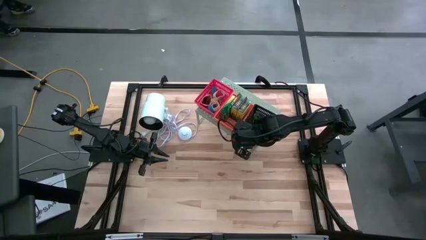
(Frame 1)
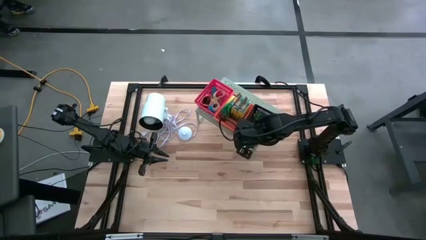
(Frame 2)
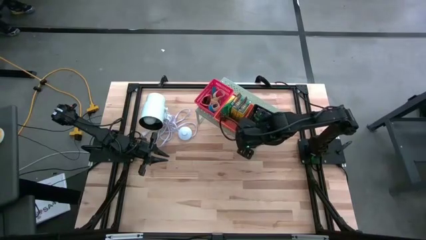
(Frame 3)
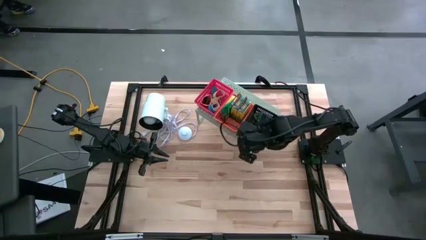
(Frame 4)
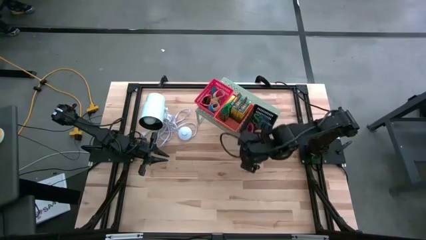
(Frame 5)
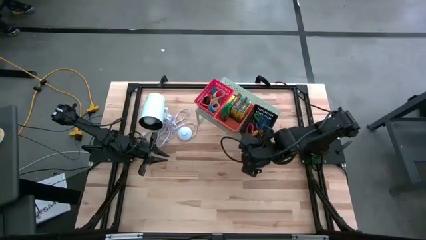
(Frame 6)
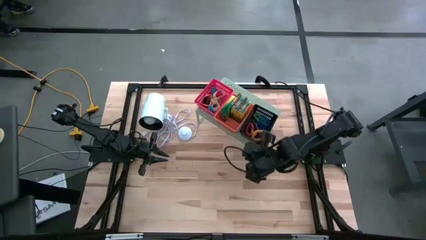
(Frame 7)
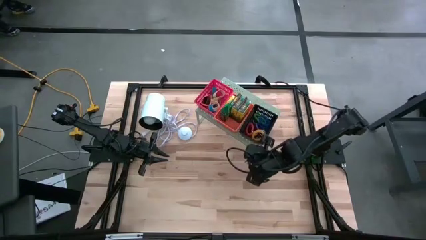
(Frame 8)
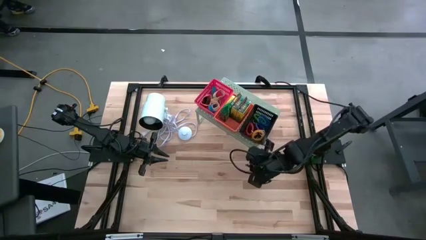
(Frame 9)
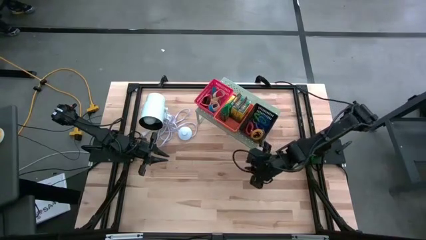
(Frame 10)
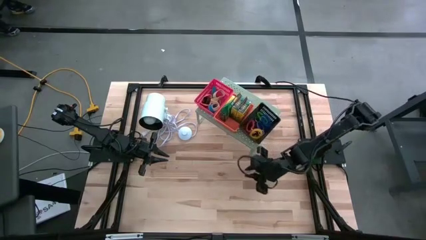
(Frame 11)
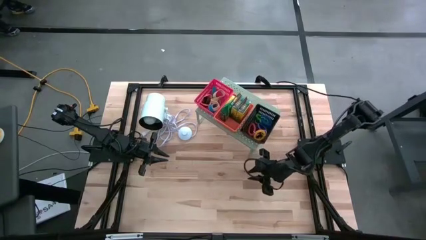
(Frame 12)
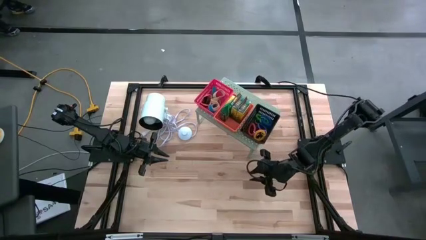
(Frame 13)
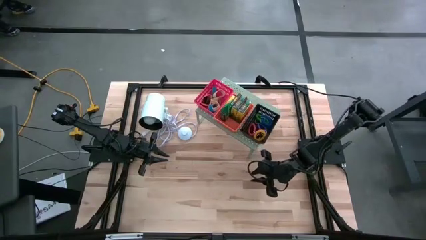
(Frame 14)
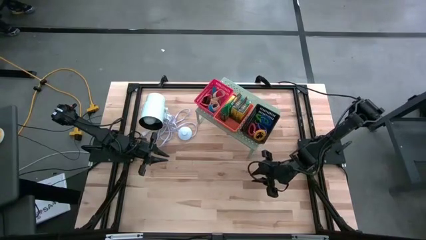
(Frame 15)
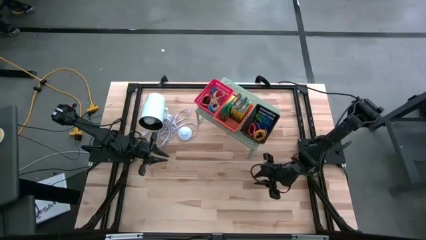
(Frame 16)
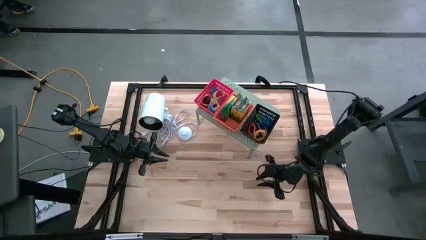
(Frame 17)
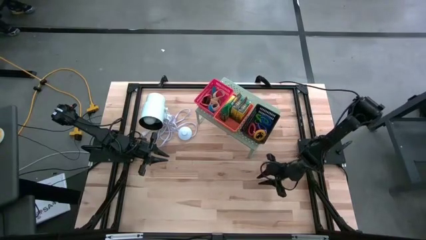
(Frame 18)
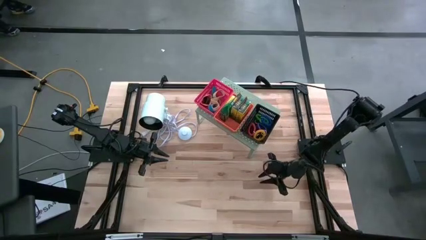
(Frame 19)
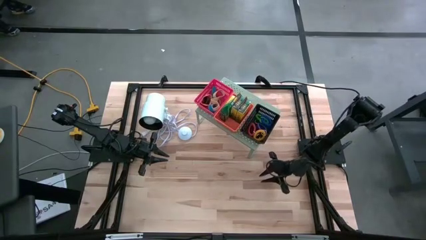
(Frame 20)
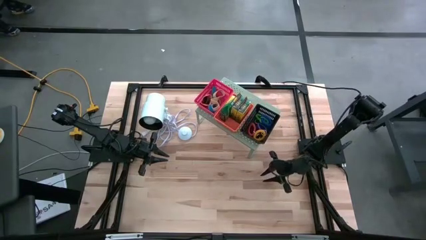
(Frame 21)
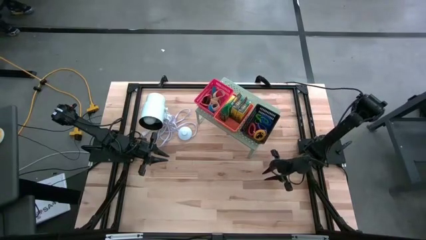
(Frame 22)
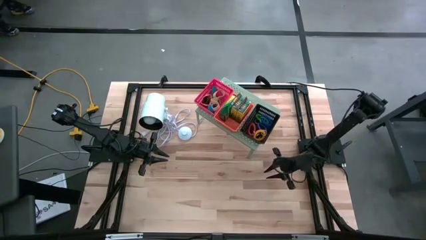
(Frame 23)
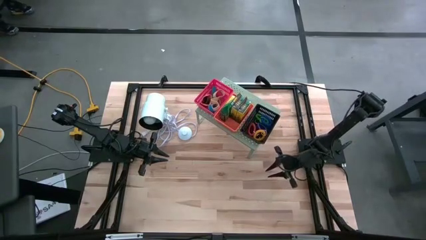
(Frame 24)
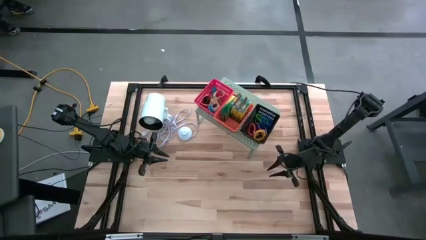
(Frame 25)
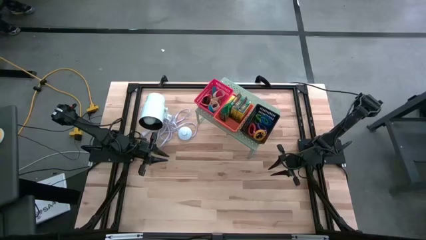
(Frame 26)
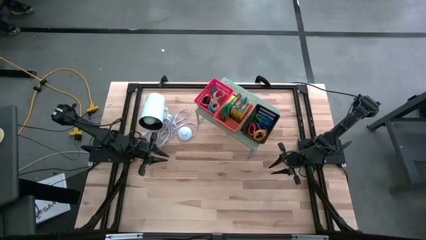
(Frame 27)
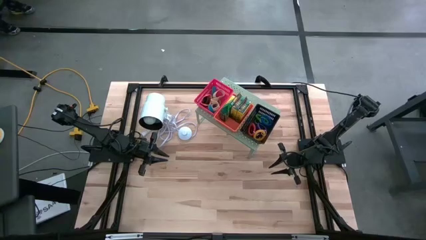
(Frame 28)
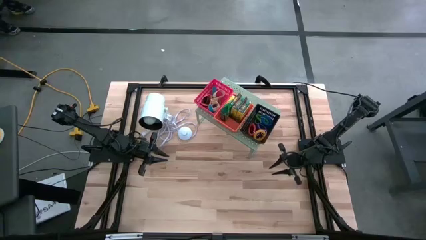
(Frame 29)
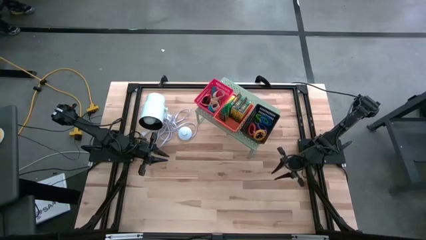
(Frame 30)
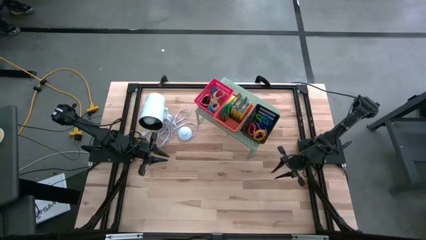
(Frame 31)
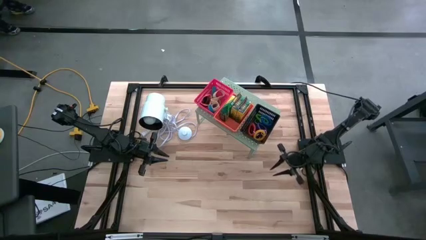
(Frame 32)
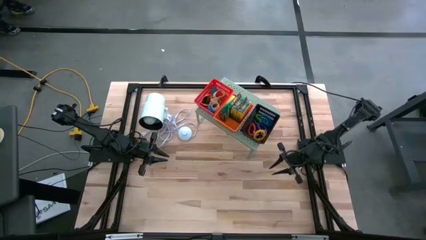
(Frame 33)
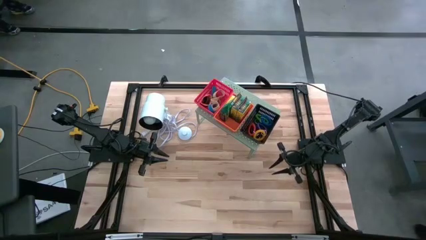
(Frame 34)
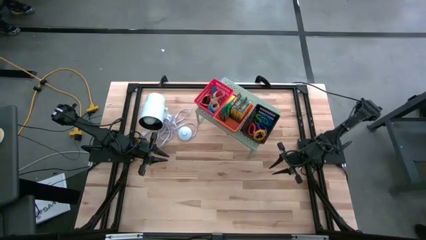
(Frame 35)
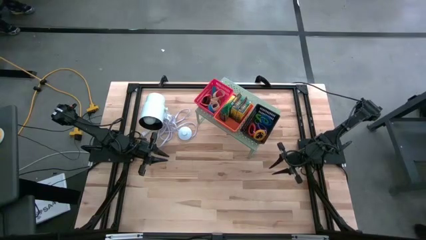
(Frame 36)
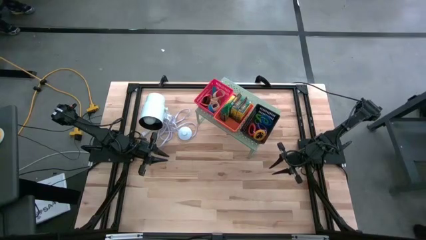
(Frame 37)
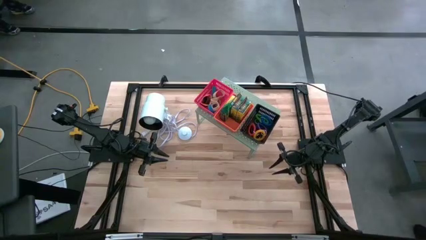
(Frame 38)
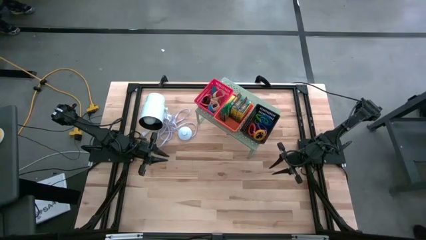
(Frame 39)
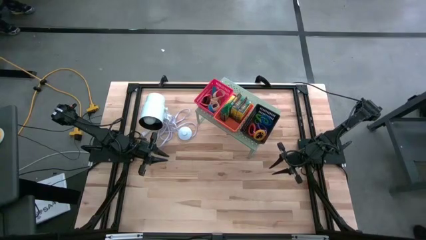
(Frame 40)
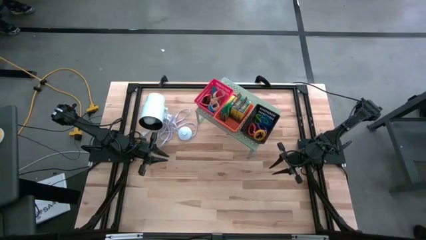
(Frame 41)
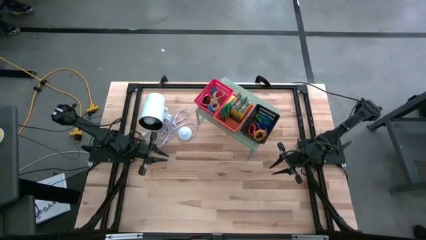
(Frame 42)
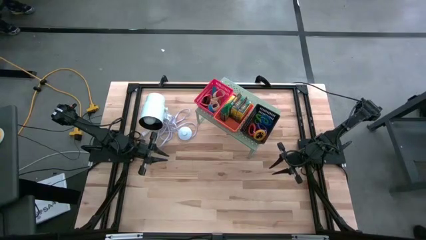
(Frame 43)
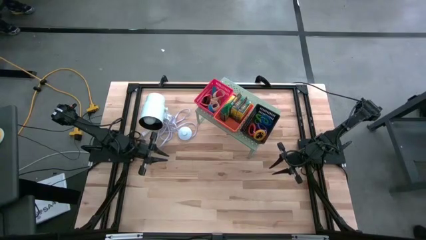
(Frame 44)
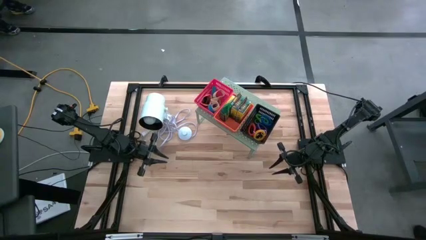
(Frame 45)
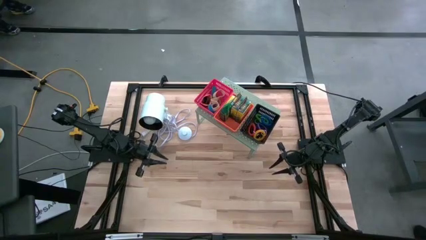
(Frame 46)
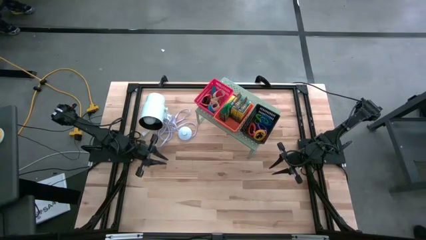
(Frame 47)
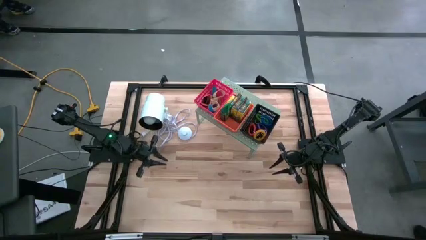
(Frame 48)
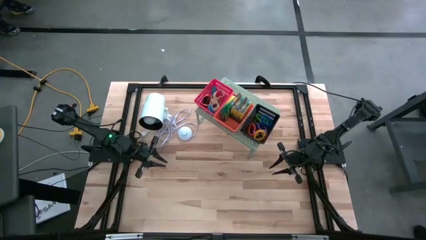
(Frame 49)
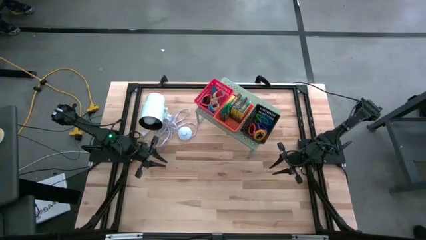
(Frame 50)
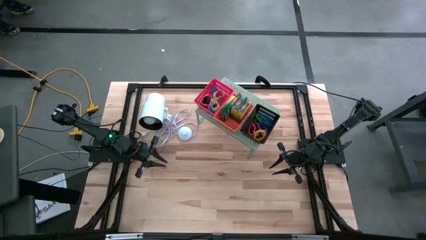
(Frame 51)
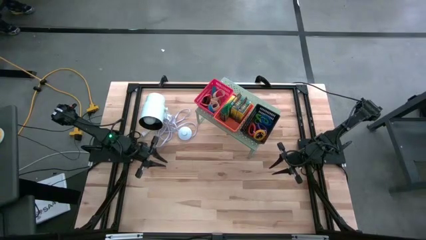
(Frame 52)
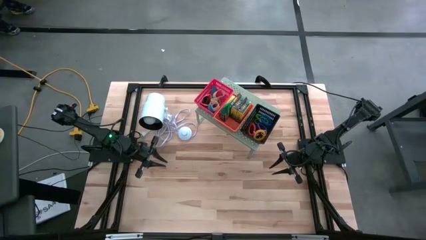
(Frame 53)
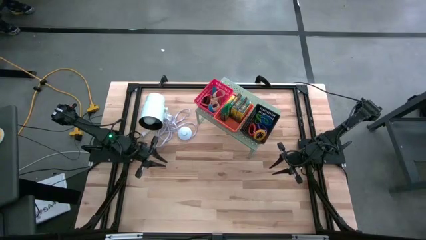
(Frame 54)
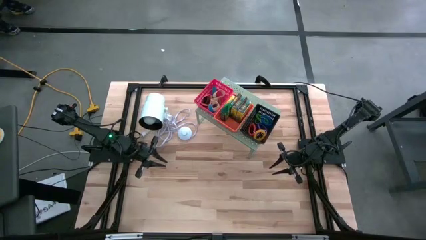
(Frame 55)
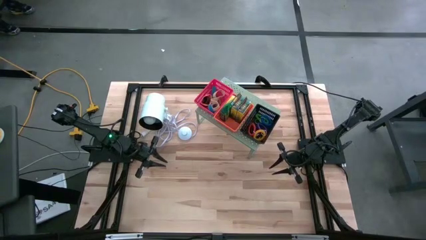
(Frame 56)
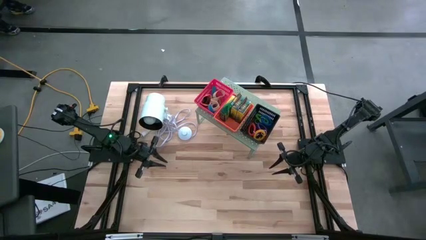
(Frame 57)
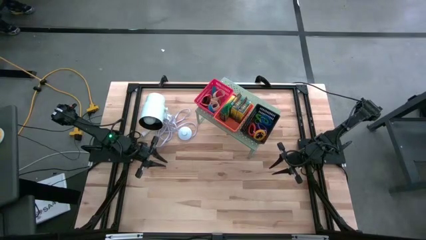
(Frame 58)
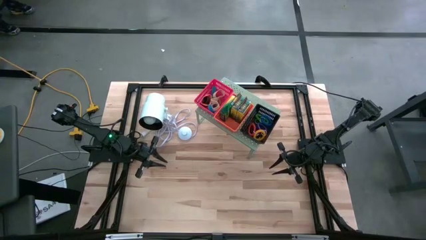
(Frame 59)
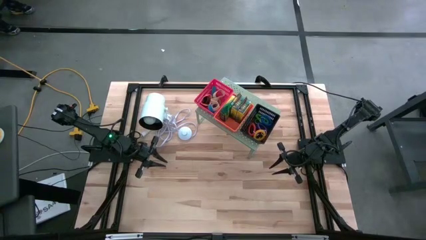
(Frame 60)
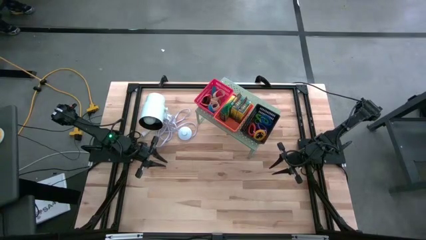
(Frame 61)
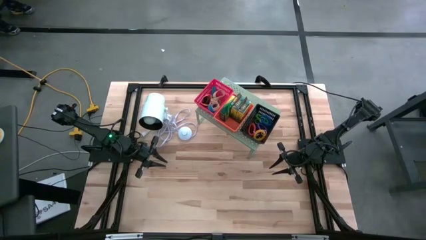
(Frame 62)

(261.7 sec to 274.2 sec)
Task: Pick & Place Office Desk Supplies
Return to Home Position
